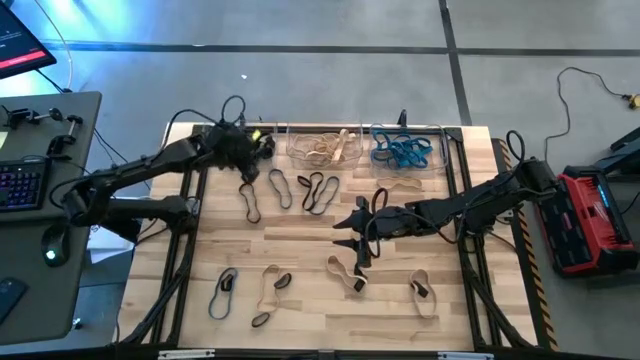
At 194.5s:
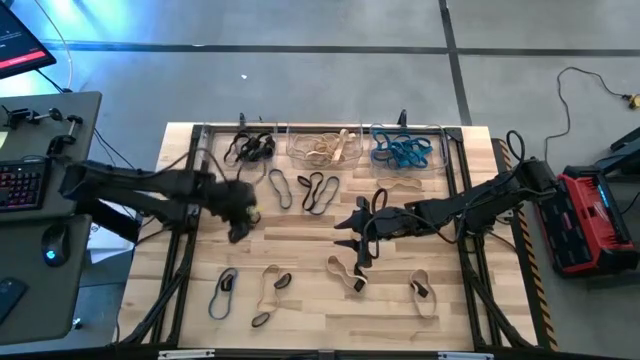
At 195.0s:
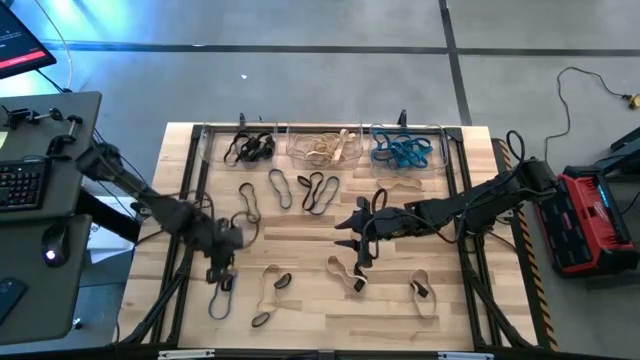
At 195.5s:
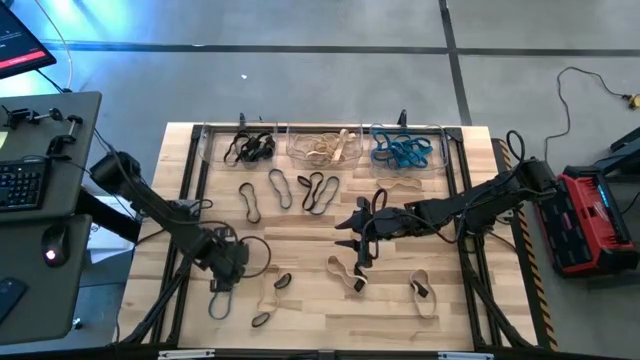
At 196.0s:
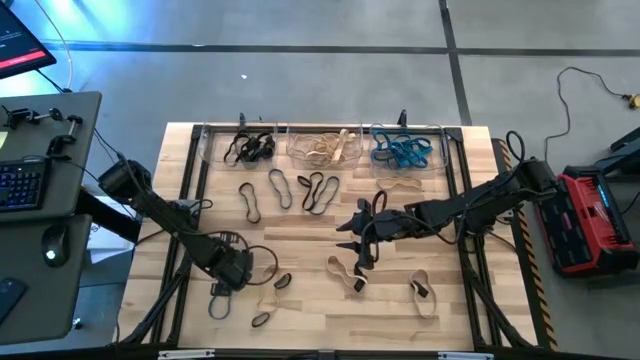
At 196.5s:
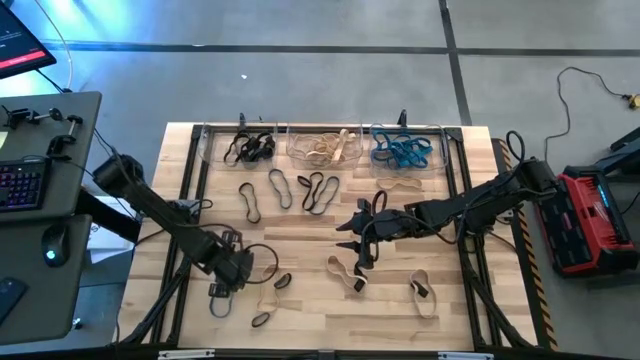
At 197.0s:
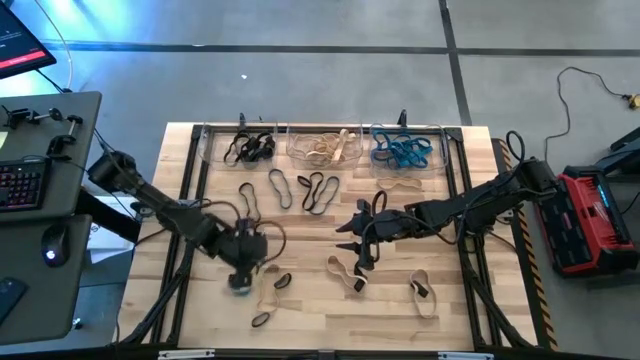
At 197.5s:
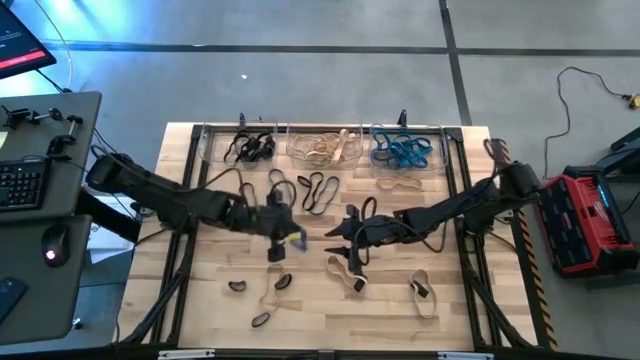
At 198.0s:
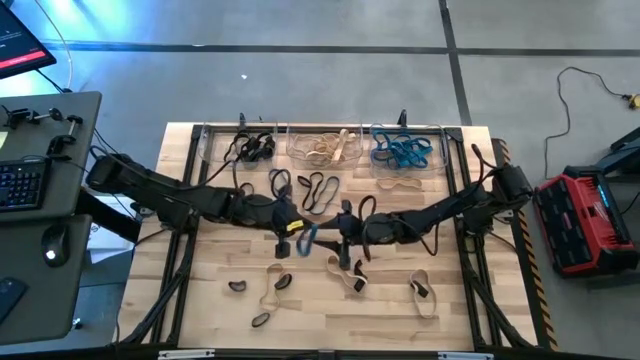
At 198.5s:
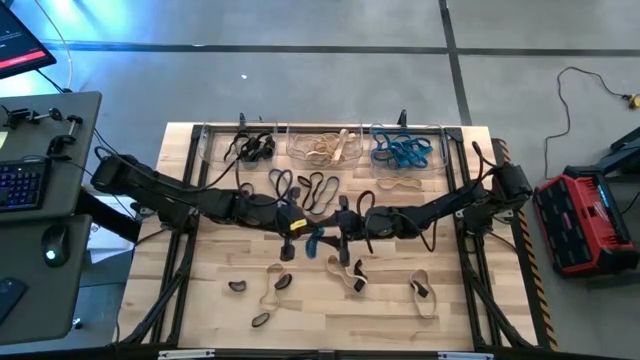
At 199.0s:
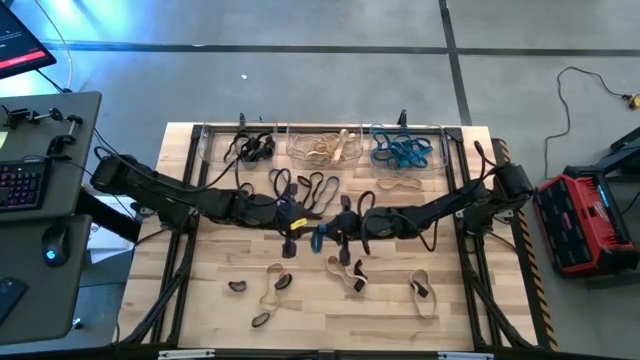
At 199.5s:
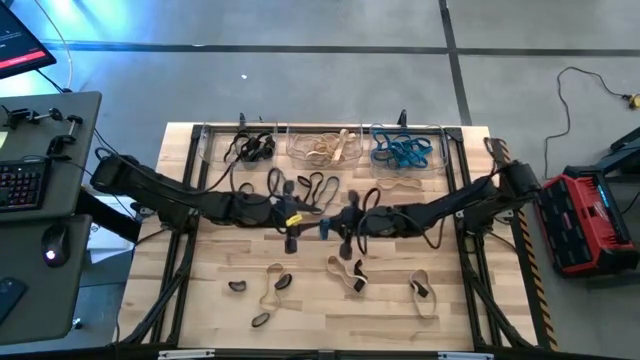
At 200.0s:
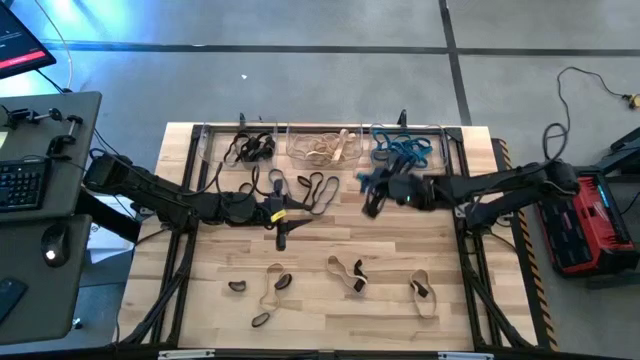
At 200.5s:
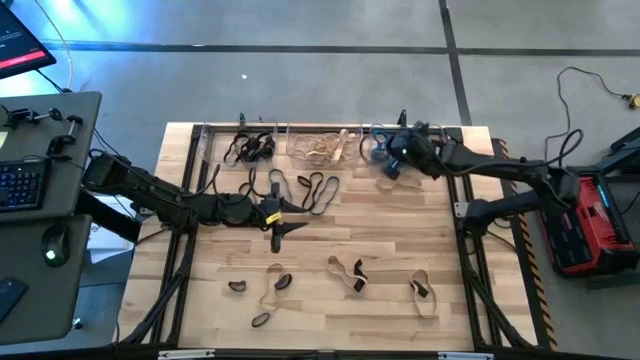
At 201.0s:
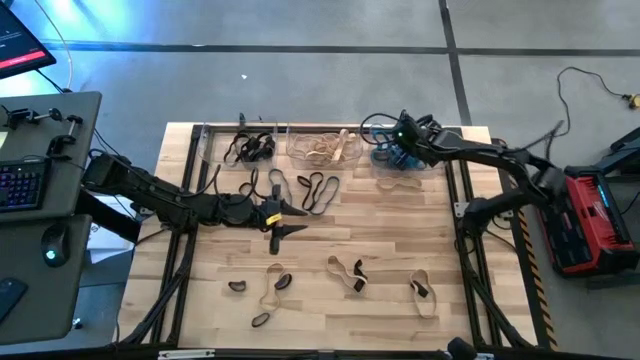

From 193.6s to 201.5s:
Task: Sort rubber bands into baskets
Put the blue rubber band into the right transparent bin

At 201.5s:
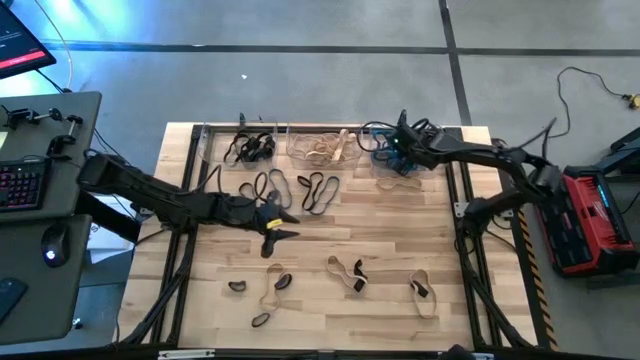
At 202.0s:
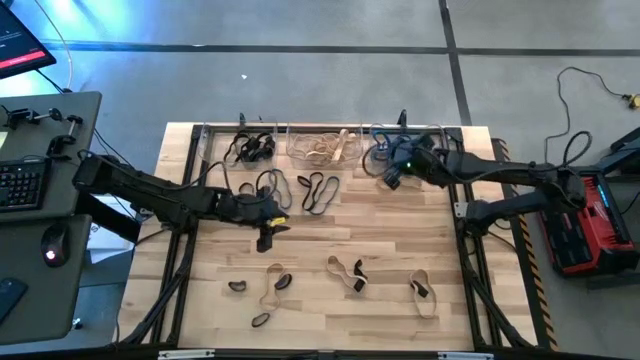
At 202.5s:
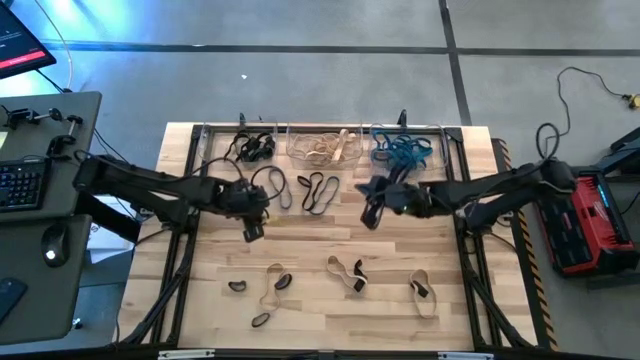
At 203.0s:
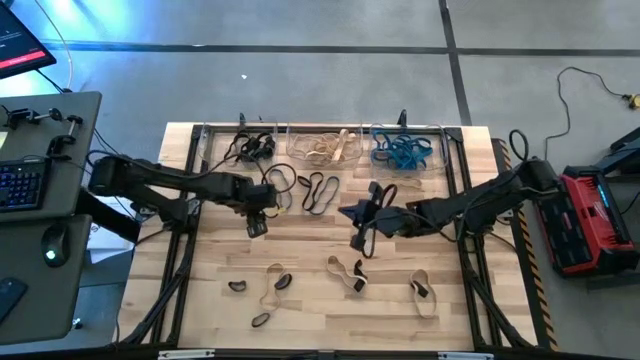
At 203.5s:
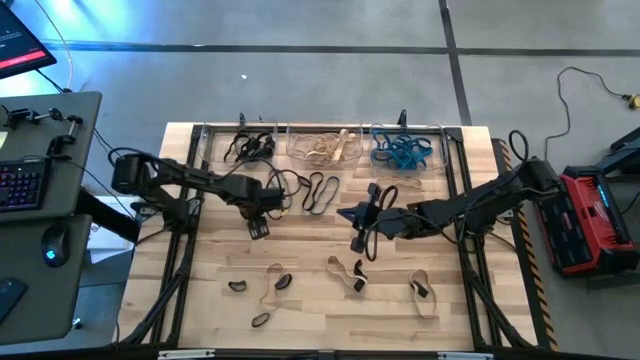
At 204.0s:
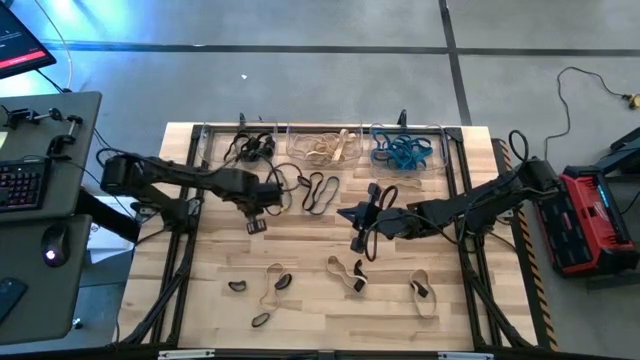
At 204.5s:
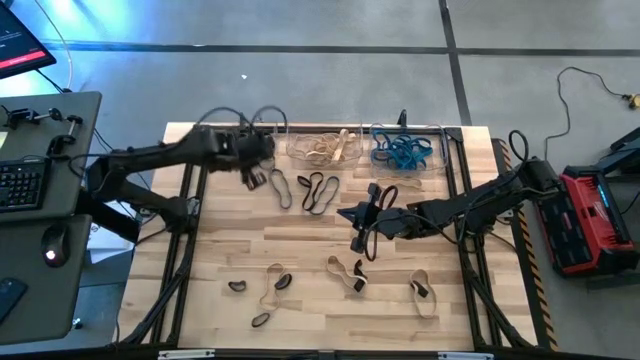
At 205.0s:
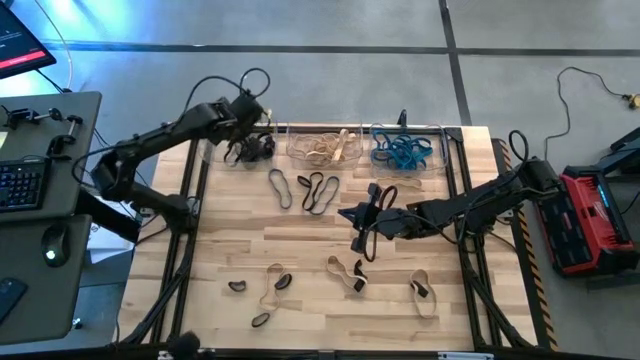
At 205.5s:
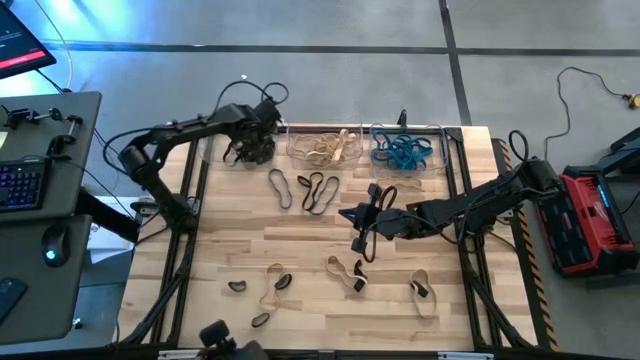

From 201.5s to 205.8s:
Put the black rubber band into the left transparent bin

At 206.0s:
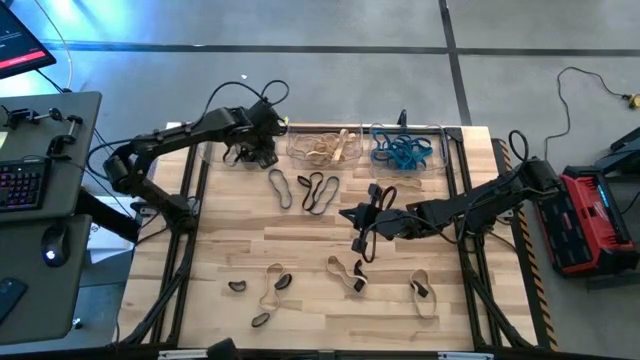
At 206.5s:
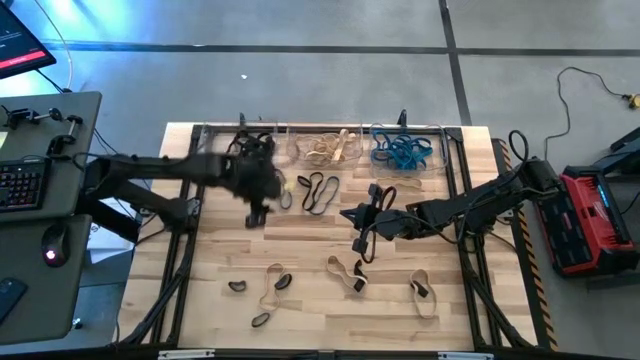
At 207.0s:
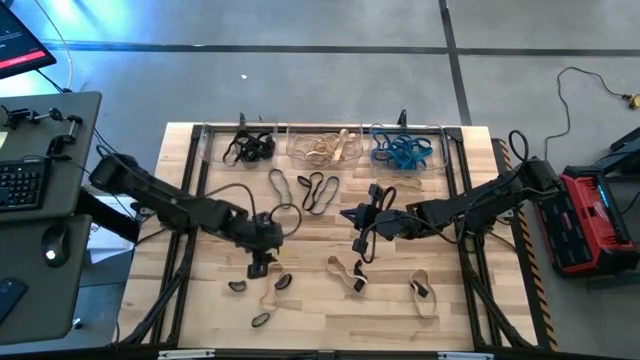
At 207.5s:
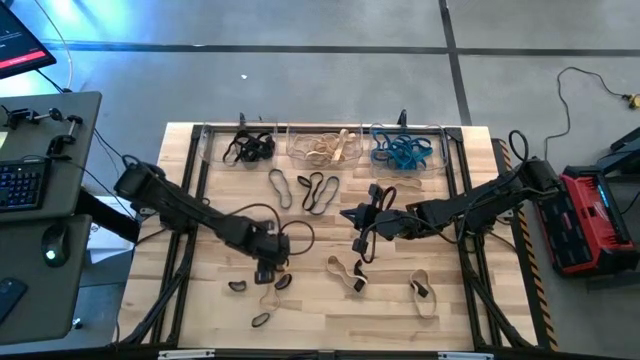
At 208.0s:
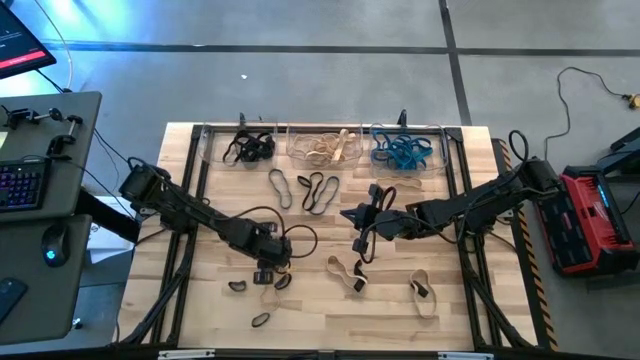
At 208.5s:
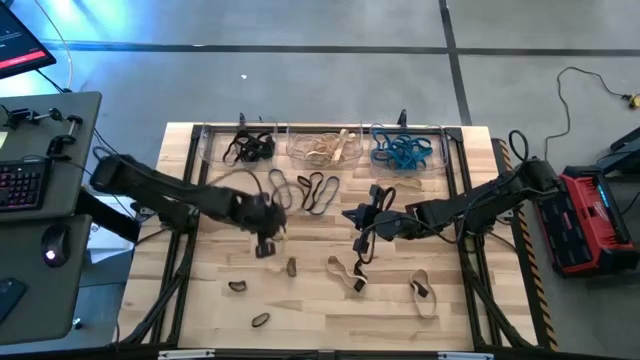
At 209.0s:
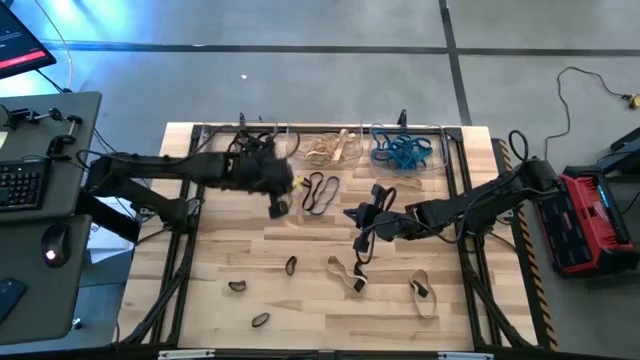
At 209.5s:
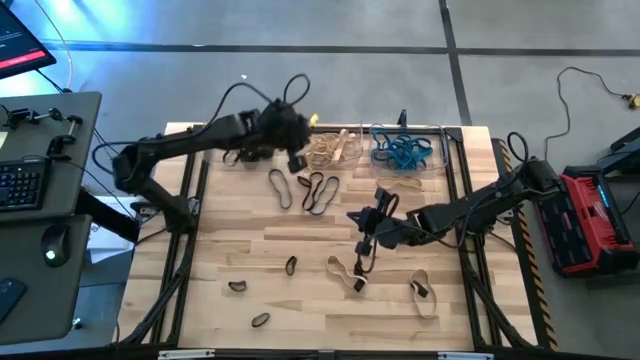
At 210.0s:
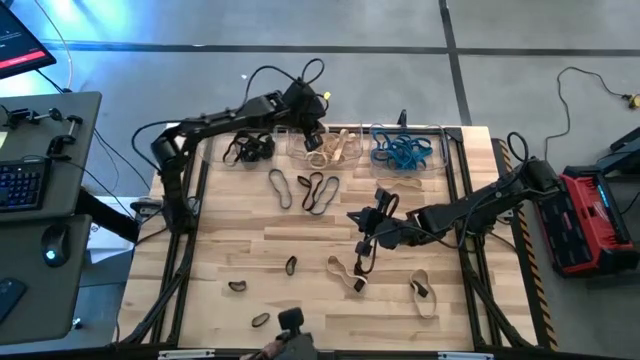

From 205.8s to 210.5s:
Put the brown rubber band into the middle transparent bin

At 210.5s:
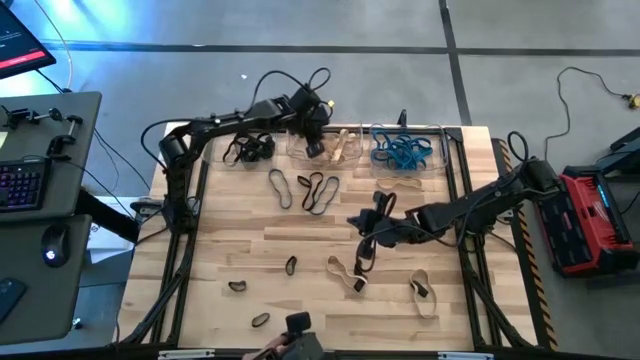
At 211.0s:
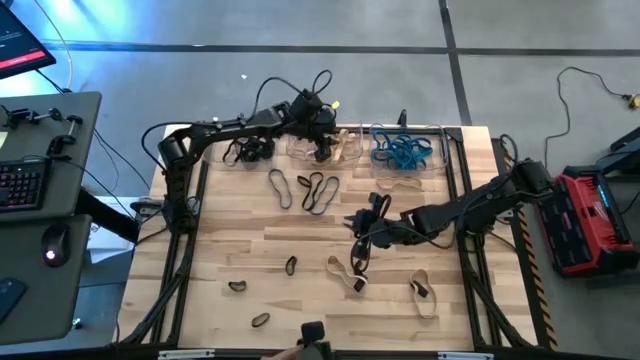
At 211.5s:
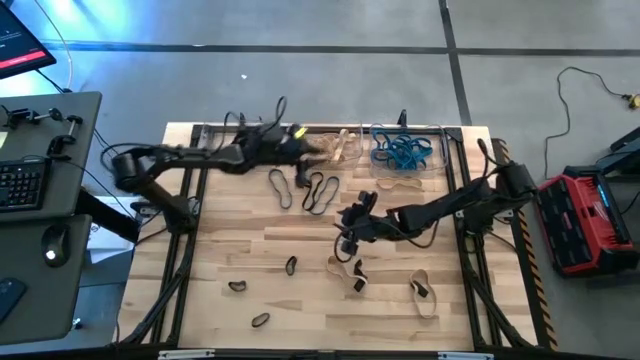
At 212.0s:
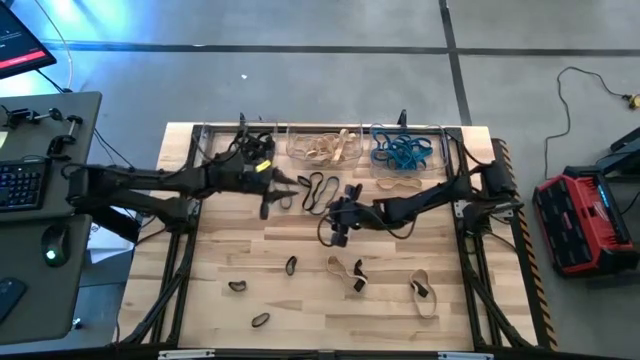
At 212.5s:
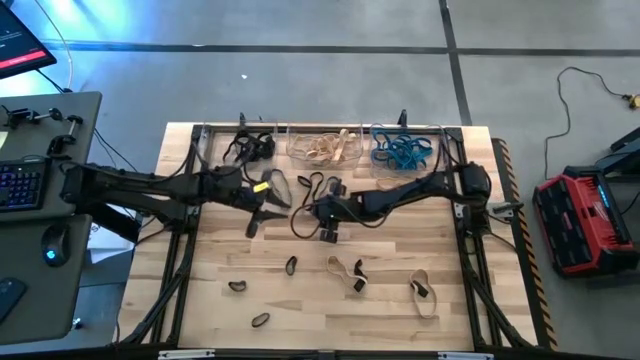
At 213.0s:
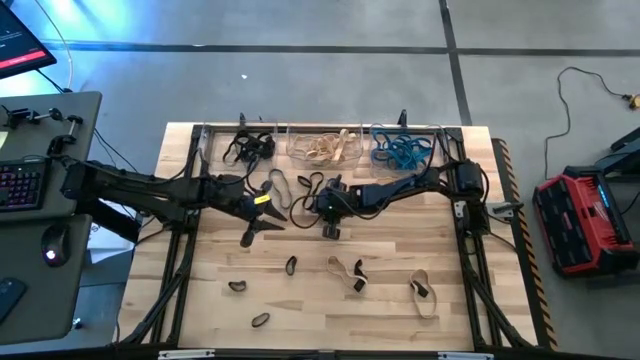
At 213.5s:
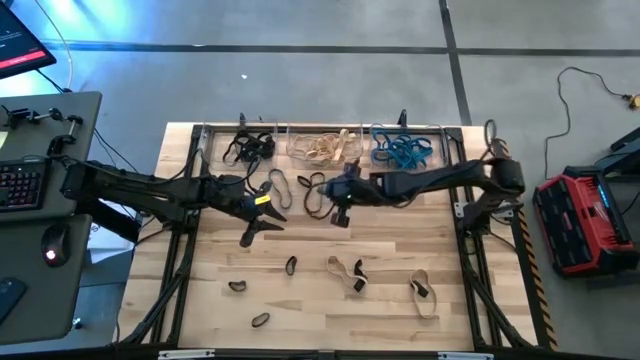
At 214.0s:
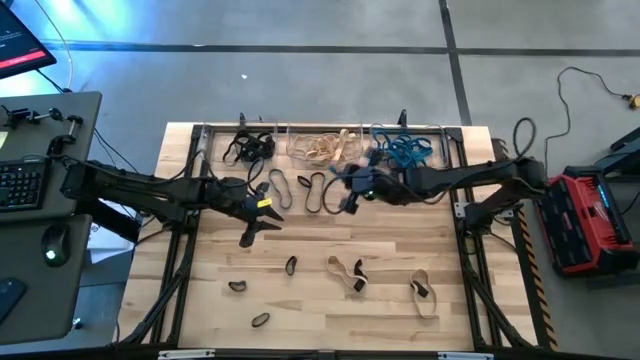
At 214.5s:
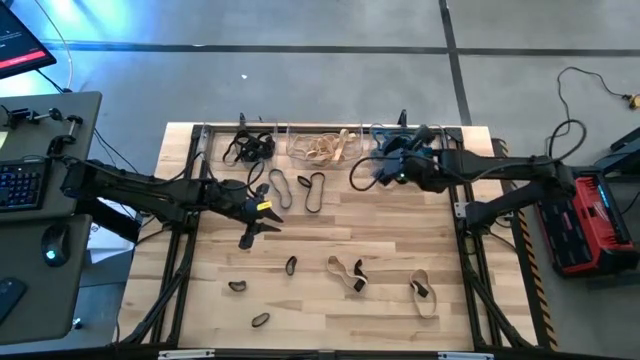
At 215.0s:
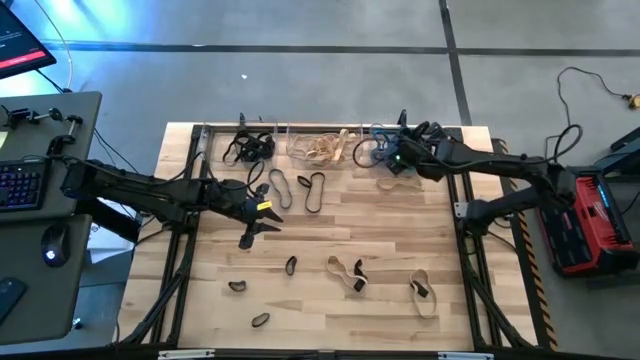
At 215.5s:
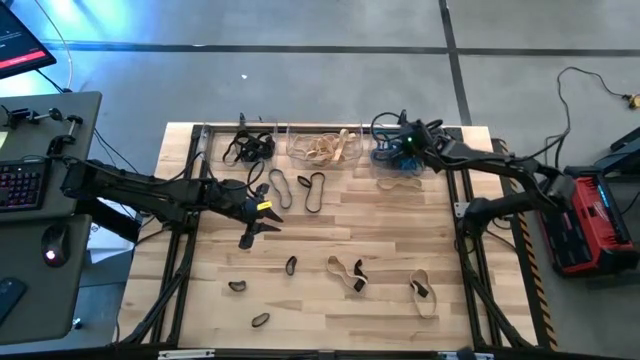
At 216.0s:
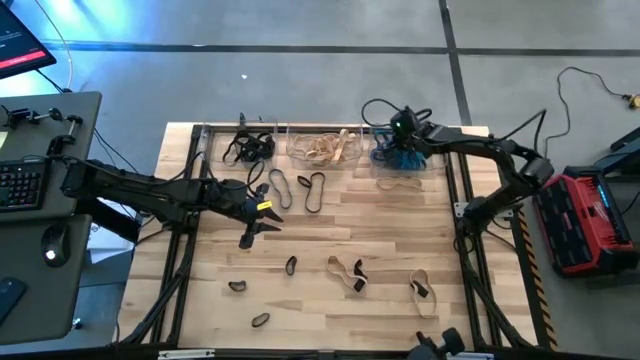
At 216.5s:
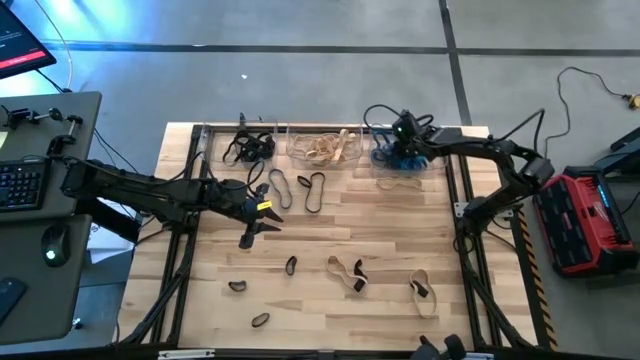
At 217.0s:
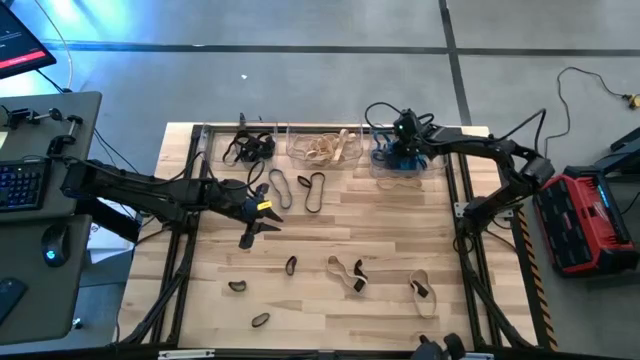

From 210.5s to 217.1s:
Put the blue rubber band into the right transparent bin
